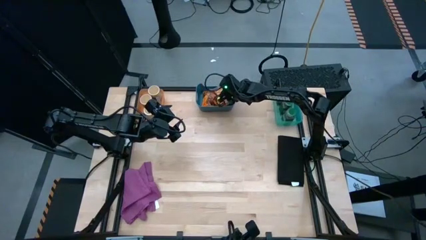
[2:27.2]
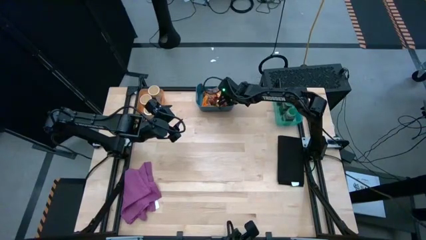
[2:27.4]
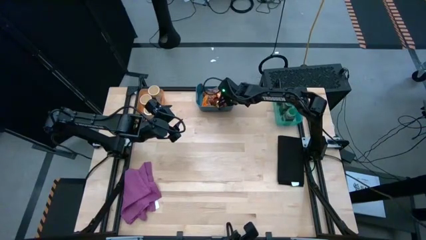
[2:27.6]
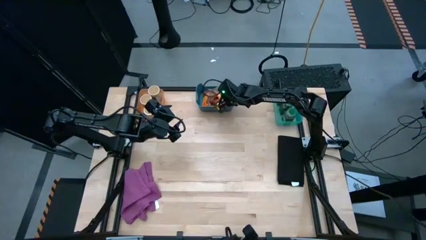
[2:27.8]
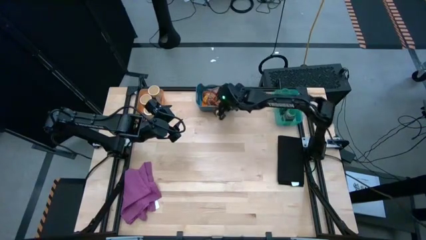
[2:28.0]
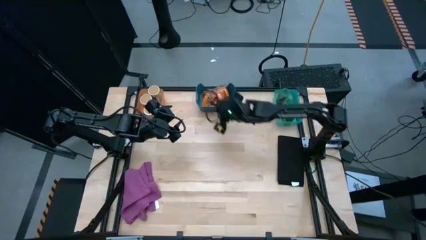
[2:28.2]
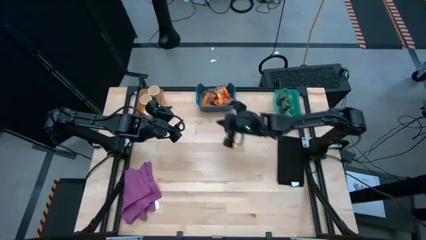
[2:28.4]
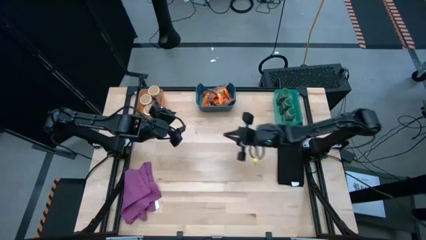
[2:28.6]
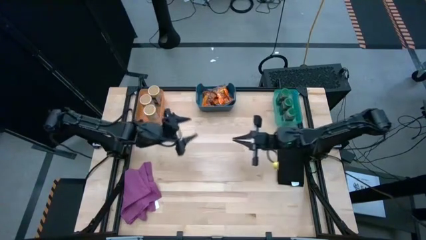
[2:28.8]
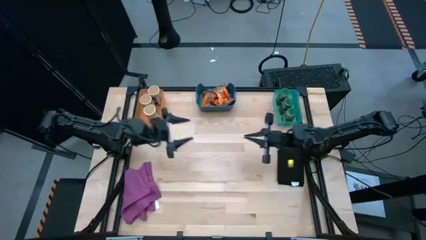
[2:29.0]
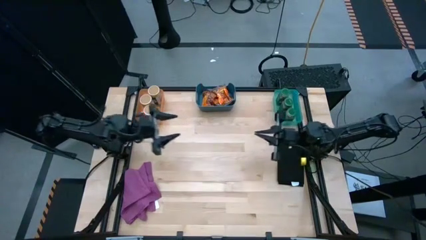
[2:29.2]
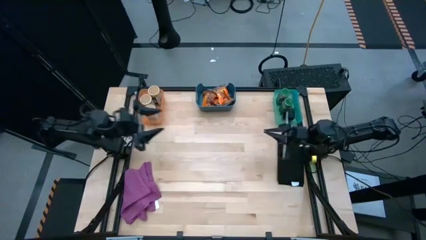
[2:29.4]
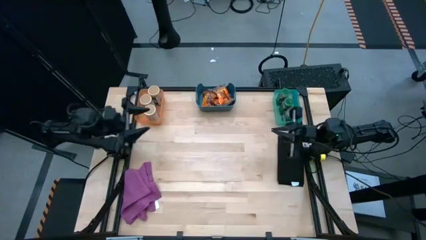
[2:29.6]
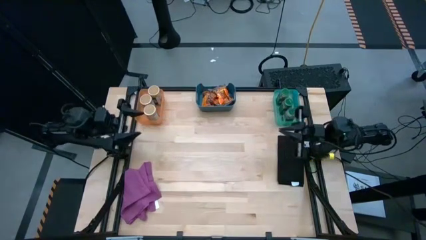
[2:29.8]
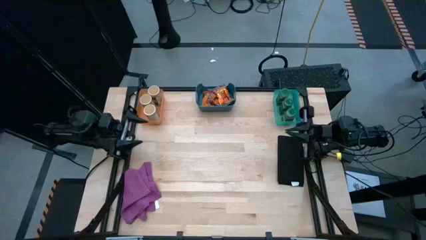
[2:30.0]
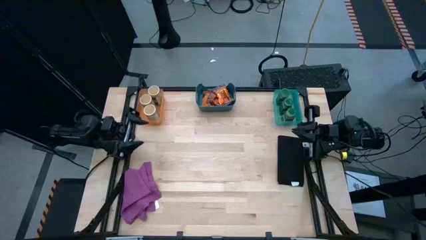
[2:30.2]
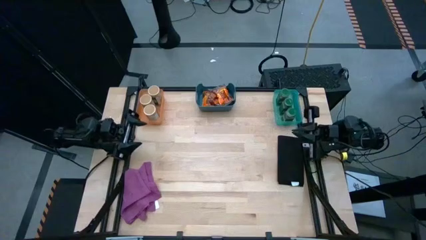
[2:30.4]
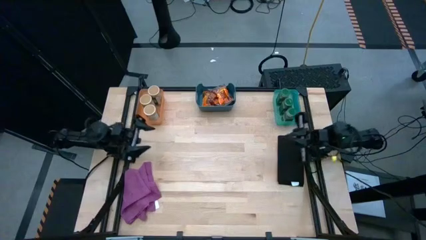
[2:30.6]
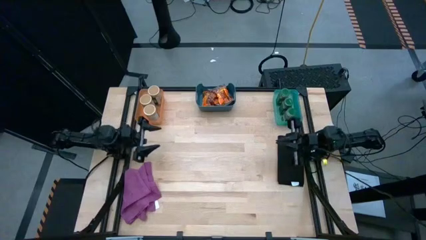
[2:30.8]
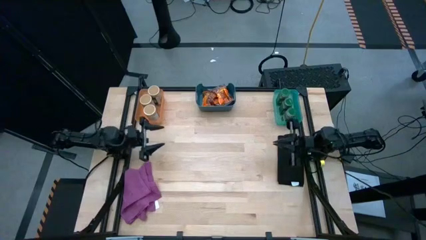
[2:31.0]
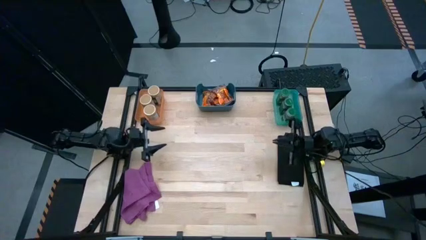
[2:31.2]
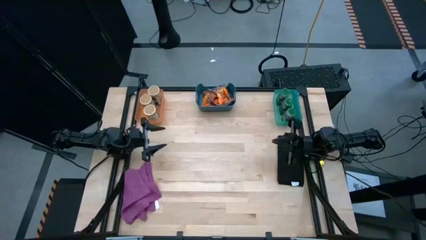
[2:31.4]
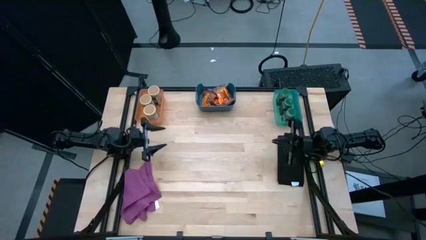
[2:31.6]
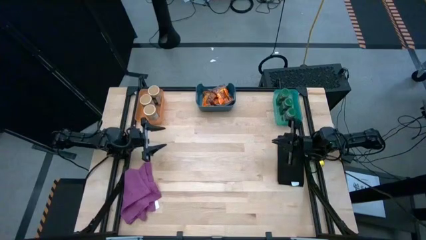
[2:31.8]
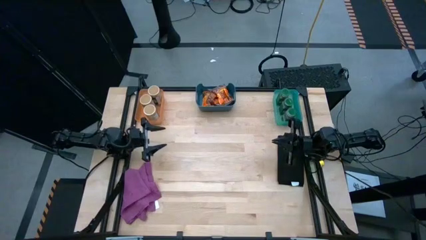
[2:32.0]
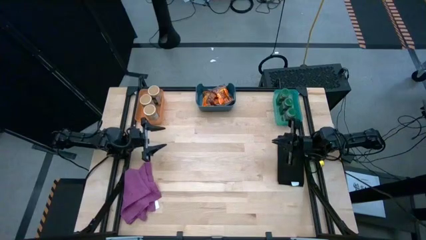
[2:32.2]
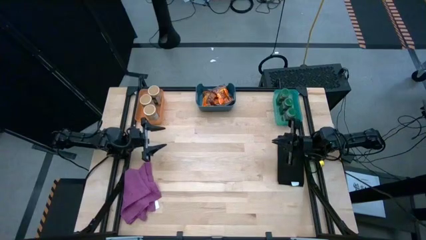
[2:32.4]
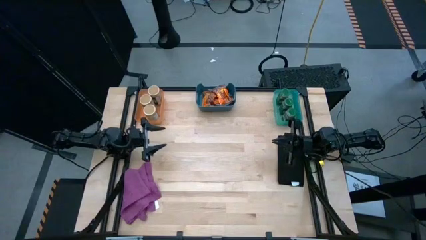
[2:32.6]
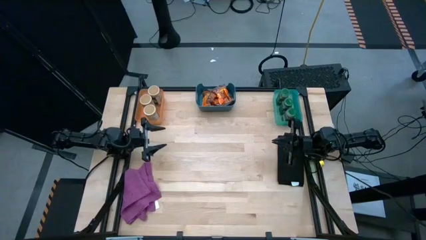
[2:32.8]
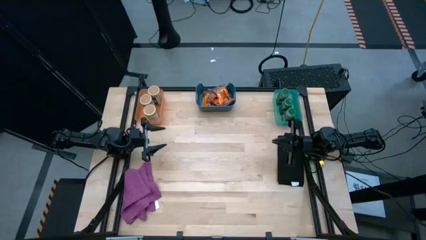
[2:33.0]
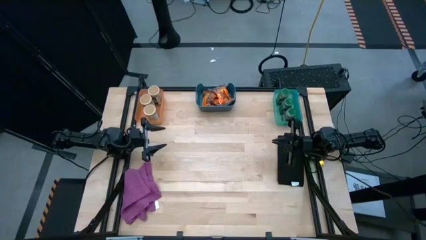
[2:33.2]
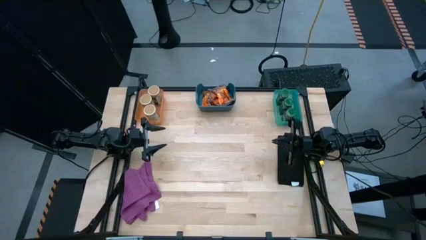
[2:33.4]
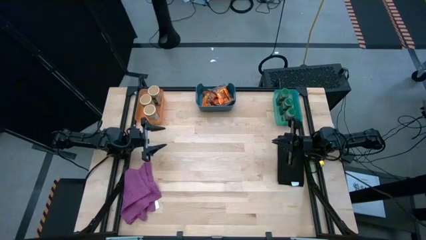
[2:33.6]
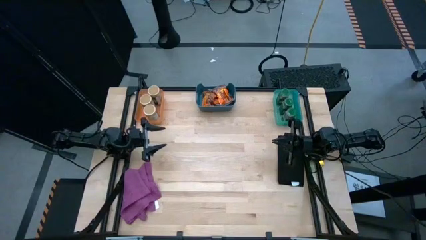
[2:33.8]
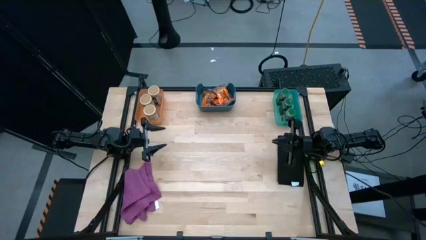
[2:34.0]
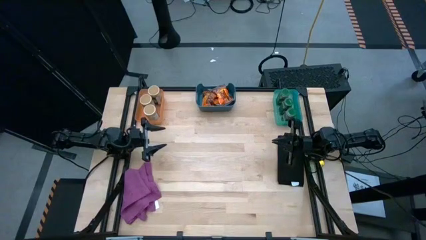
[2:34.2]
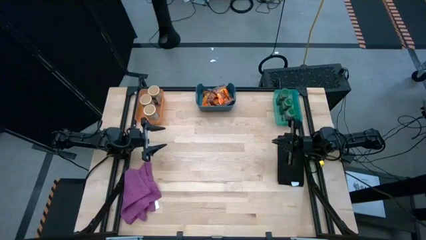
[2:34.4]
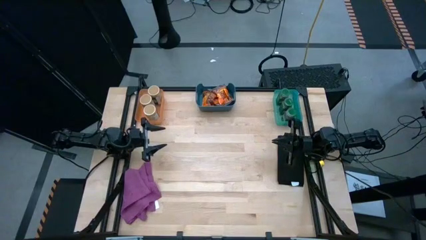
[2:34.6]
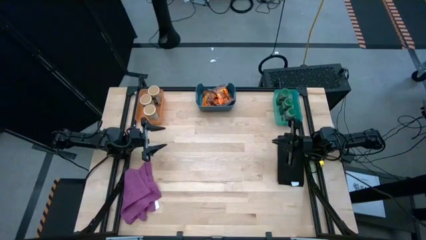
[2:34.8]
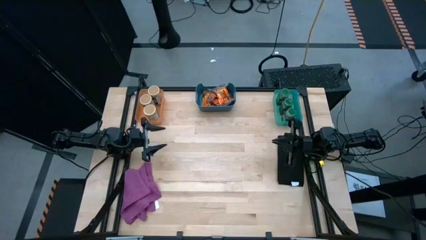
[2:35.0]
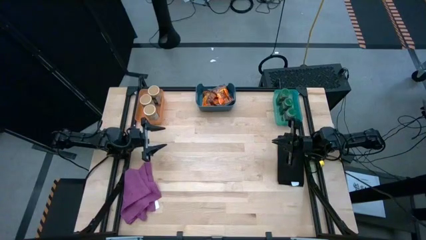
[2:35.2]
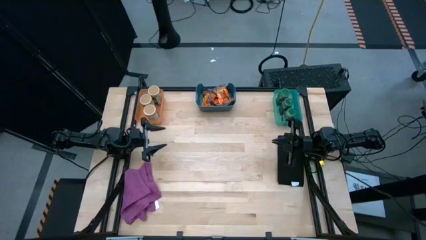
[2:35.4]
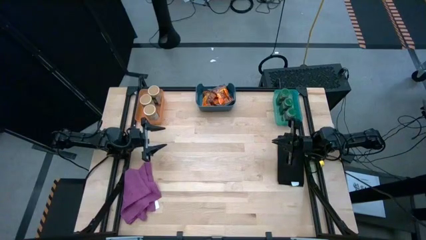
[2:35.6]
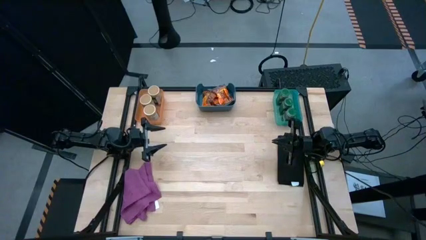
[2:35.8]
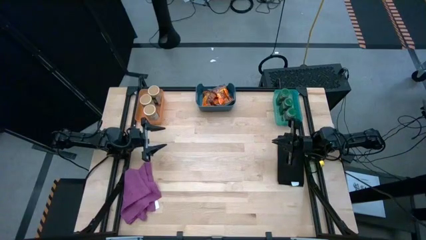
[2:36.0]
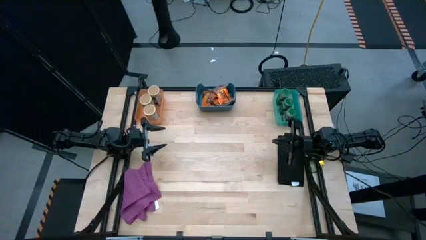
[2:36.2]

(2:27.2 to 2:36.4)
Task: Sort spices by type
Return to Home Position

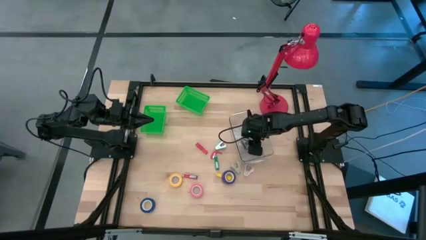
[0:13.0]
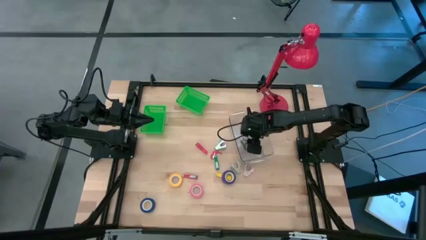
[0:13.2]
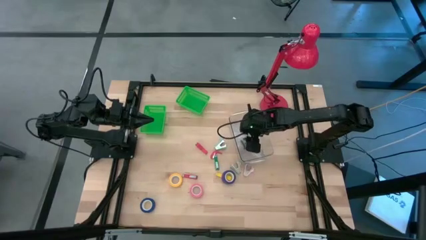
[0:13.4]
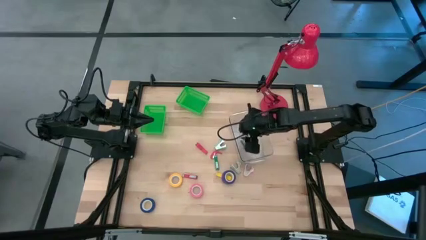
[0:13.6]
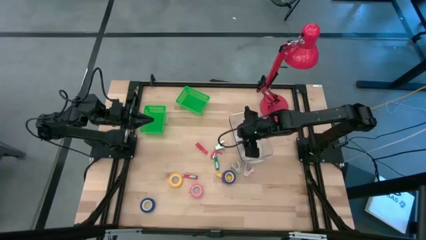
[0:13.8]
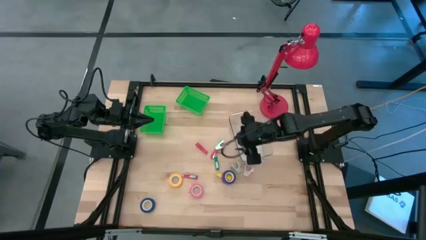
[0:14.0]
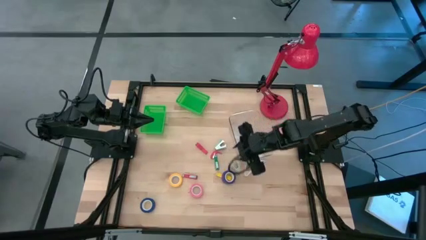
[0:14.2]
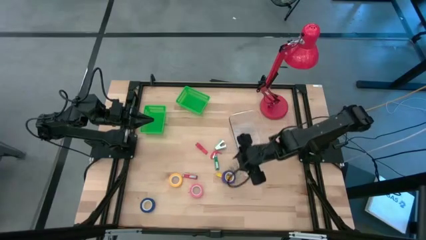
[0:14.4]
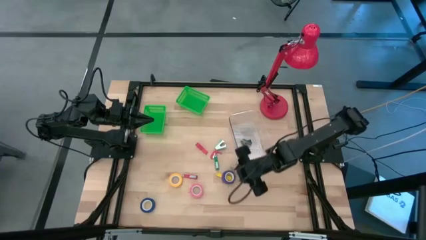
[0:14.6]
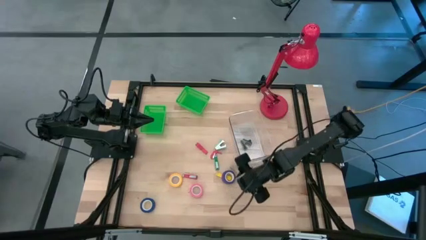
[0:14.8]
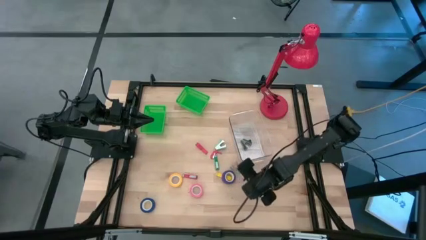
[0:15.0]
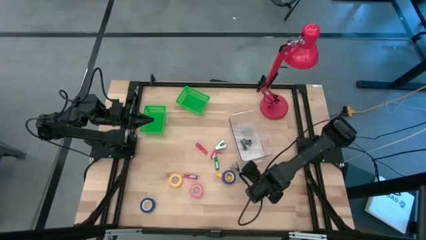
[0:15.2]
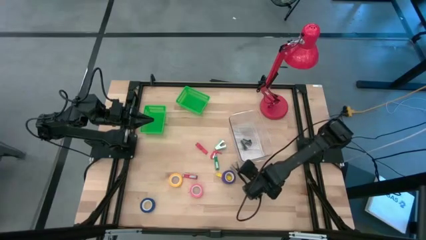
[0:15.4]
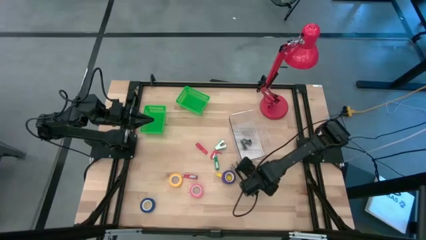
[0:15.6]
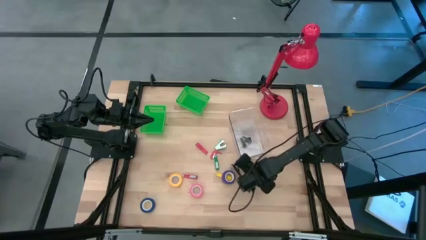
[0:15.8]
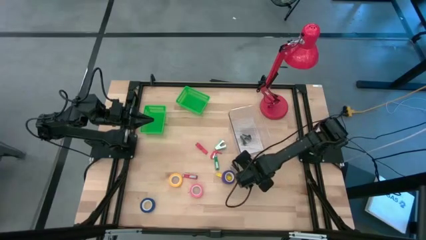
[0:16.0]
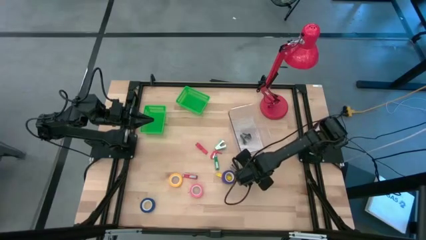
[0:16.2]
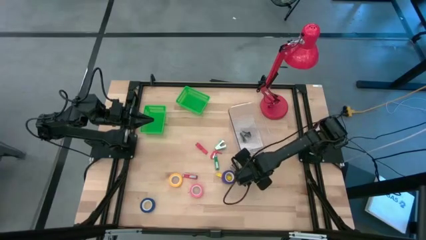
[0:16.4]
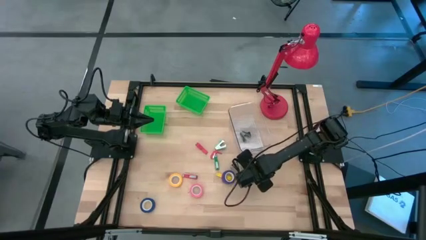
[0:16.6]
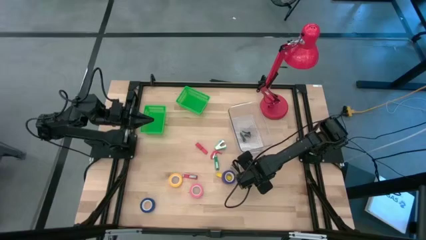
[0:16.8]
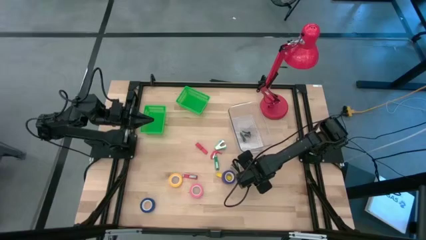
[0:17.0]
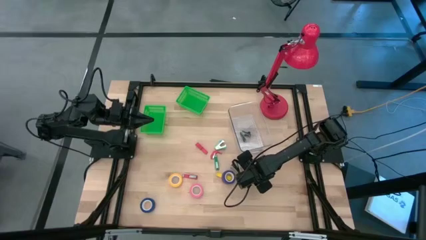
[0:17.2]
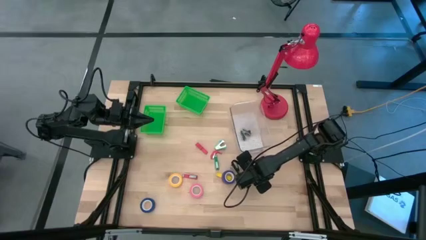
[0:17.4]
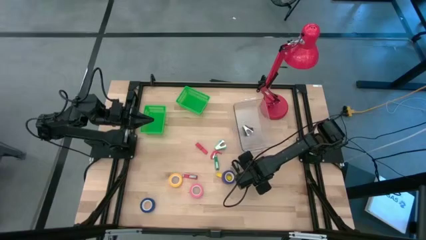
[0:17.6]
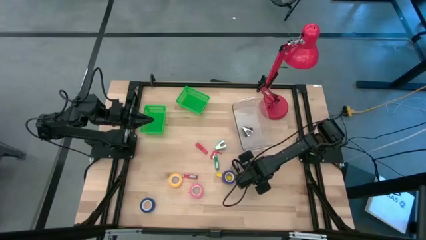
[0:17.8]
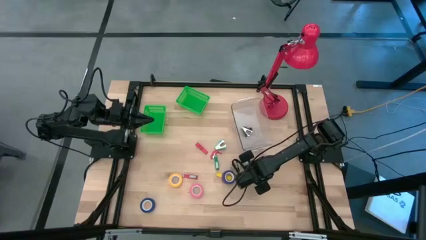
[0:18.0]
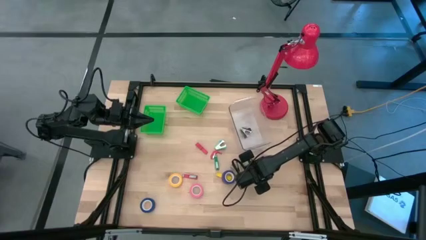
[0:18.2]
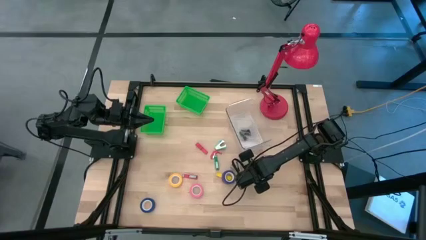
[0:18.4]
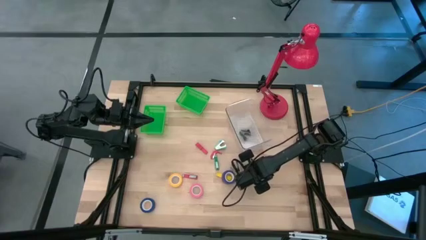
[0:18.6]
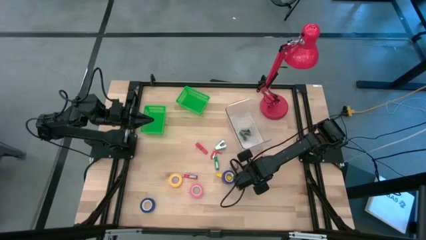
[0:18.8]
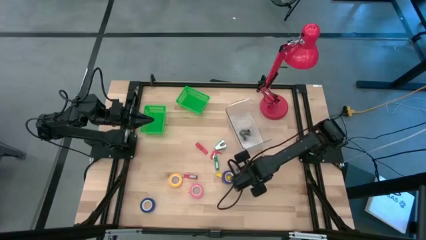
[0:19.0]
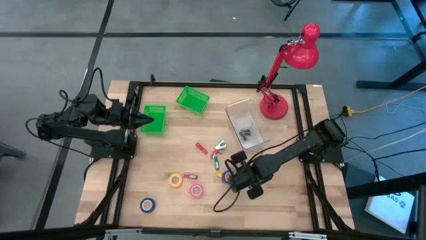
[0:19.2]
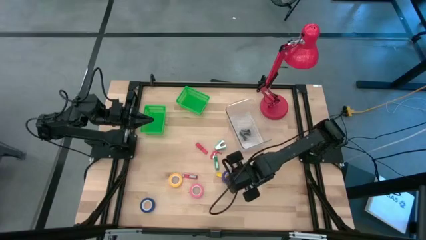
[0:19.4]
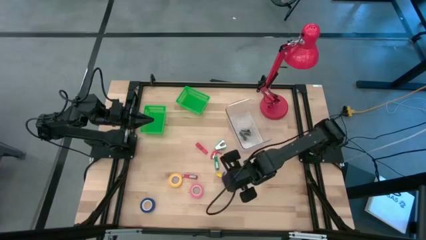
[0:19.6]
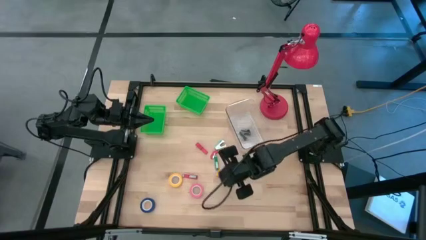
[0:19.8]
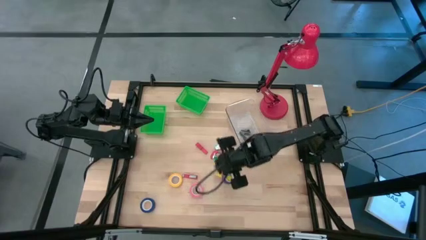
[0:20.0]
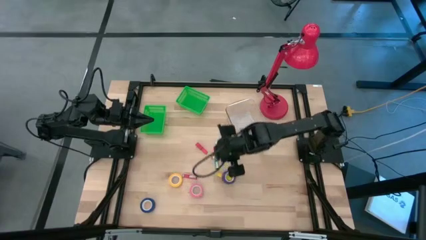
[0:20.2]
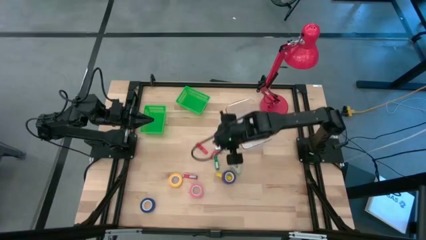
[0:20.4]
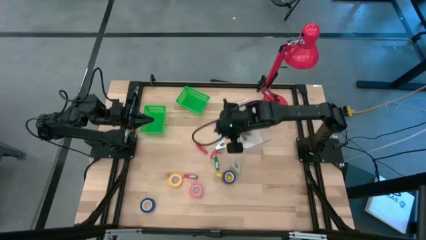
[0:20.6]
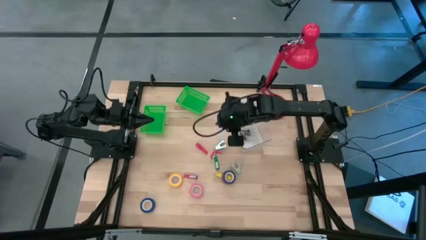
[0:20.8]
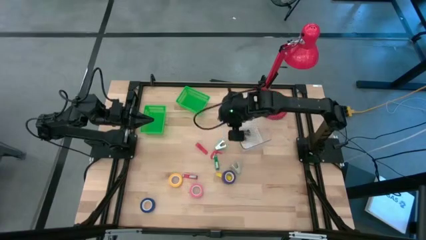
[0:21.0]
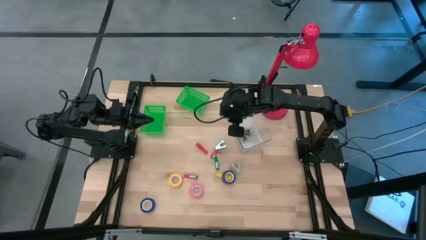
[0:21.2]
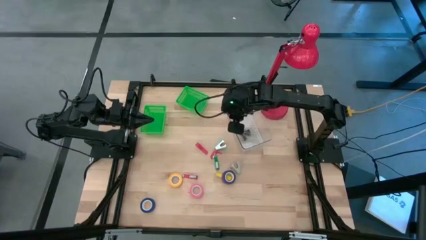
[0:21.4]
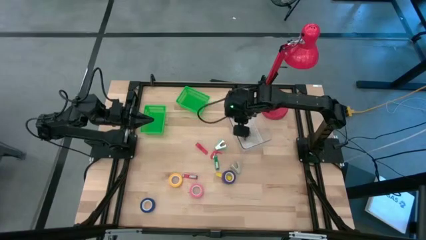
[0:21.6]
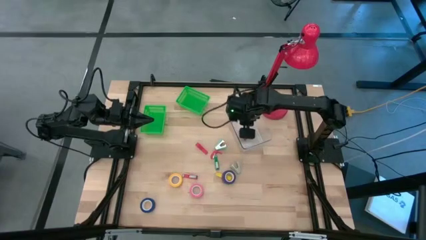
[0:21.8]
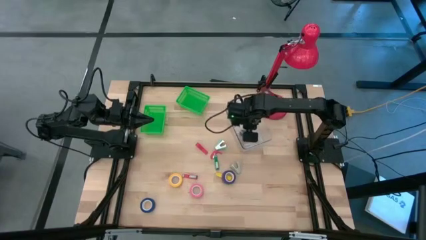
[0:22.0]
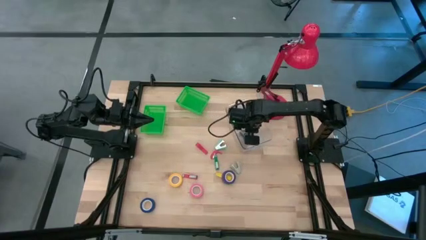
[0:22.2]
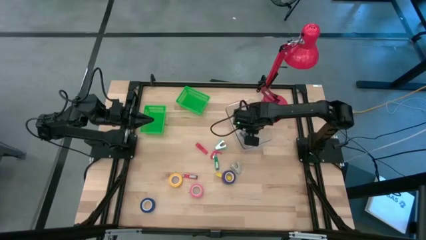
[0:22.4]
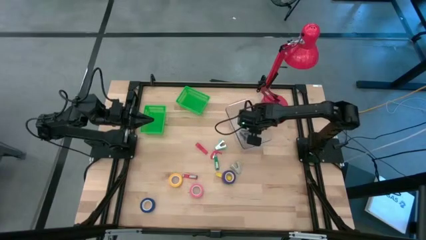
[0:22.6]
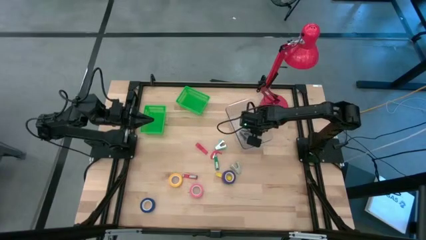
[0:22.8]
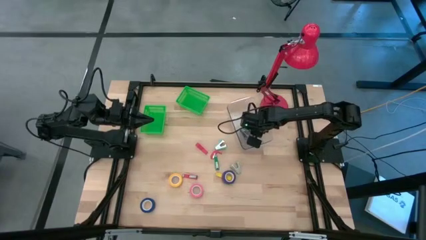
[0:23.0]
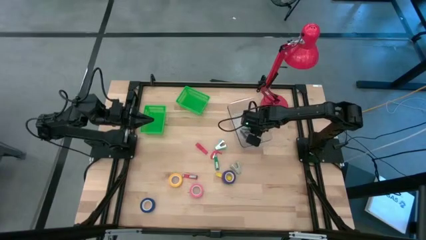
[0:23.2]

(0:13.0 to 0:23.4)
Task: Pick and place Stapler, Stapler remover, tape
Put the pink staple remover into the transparent bin
